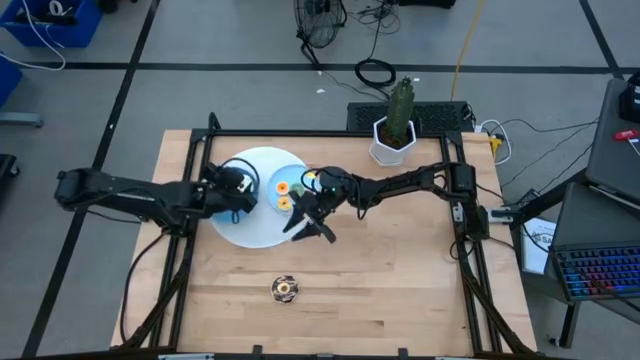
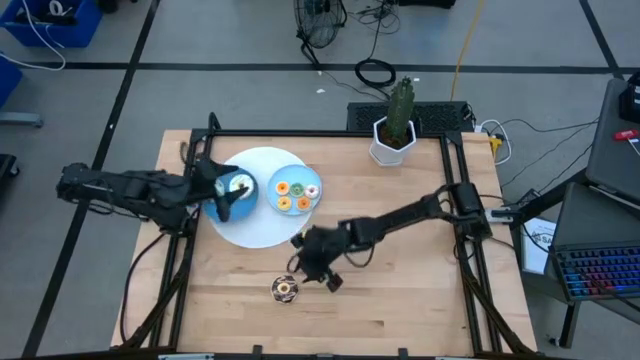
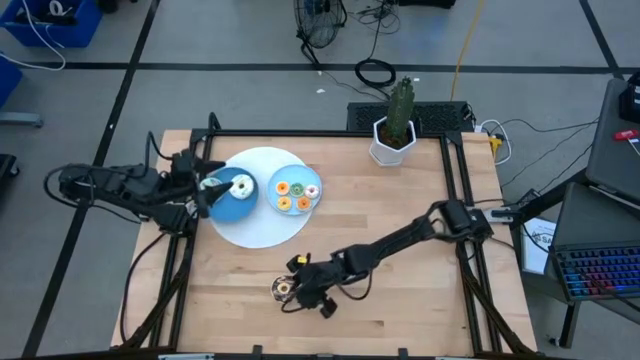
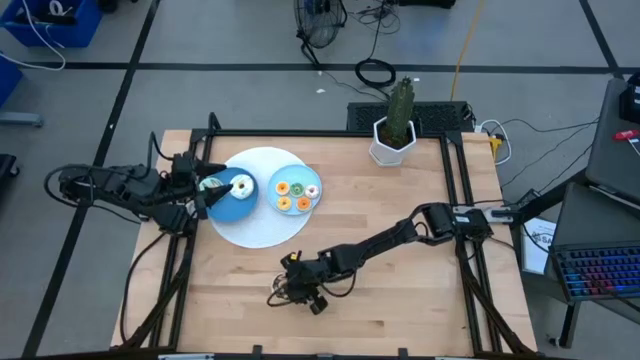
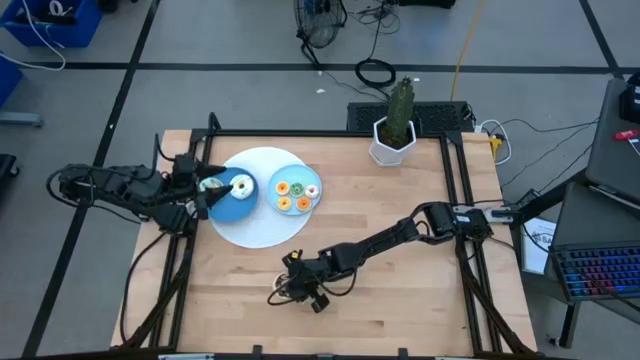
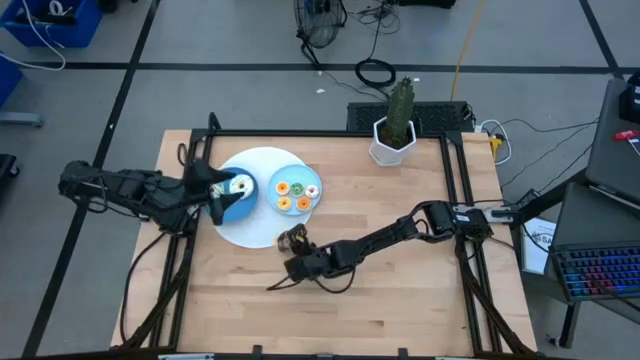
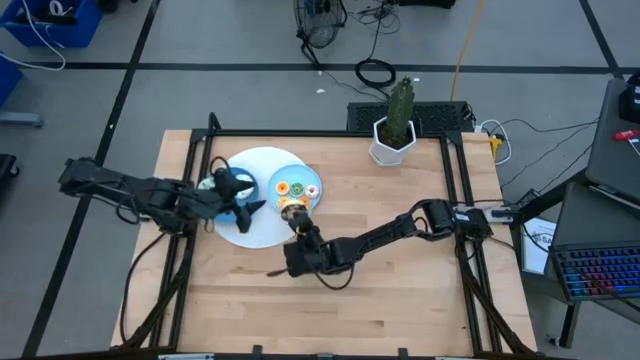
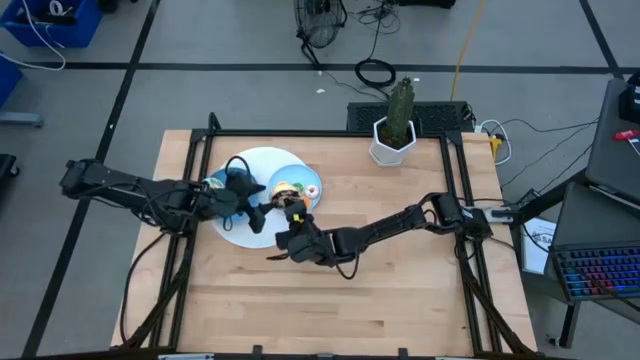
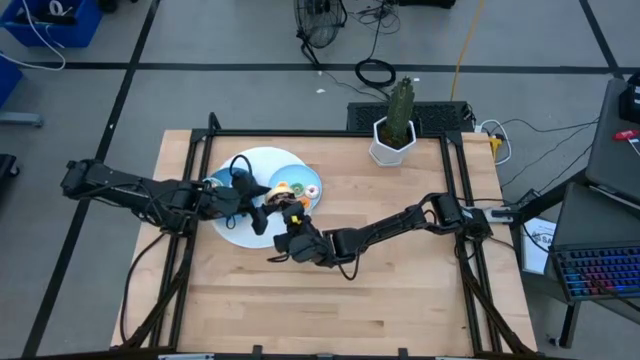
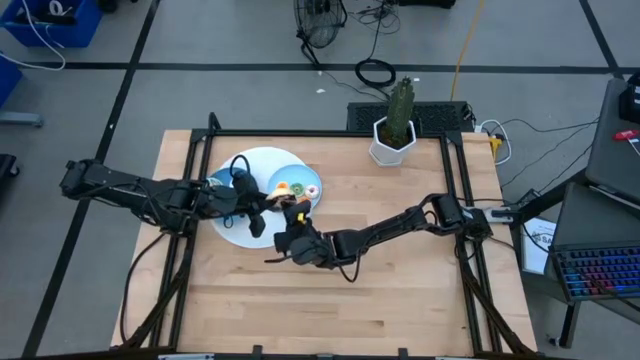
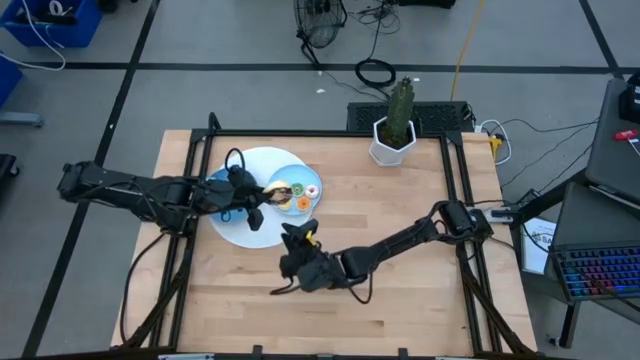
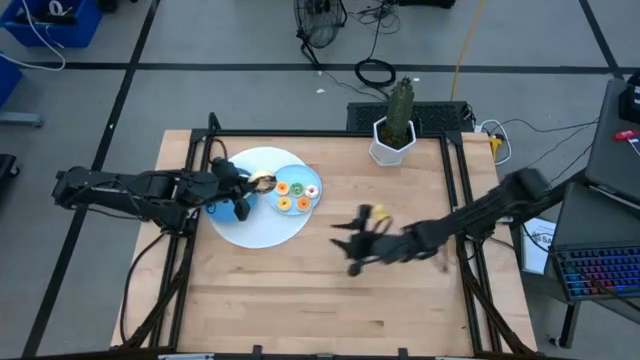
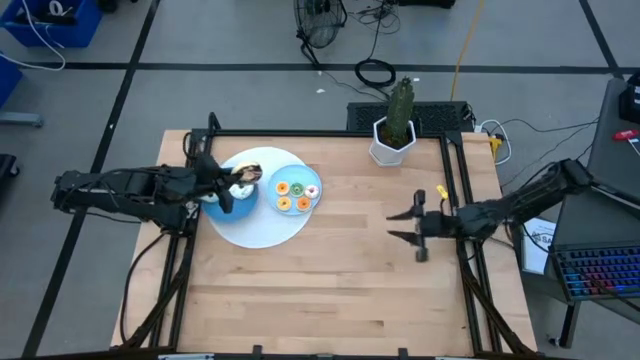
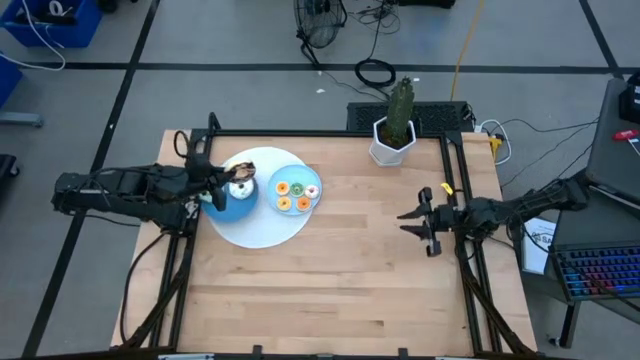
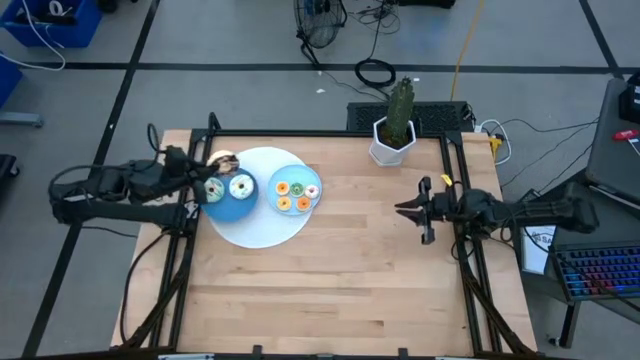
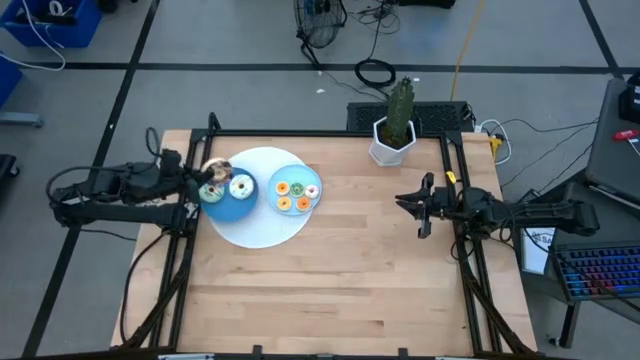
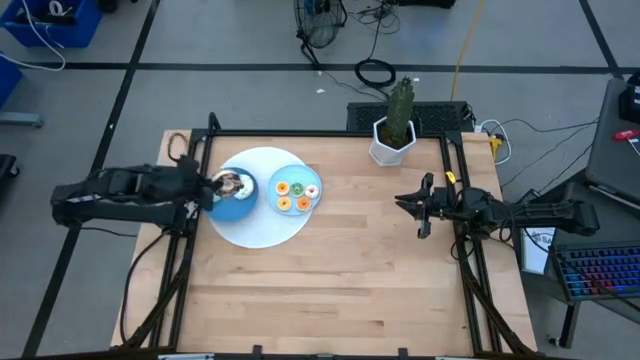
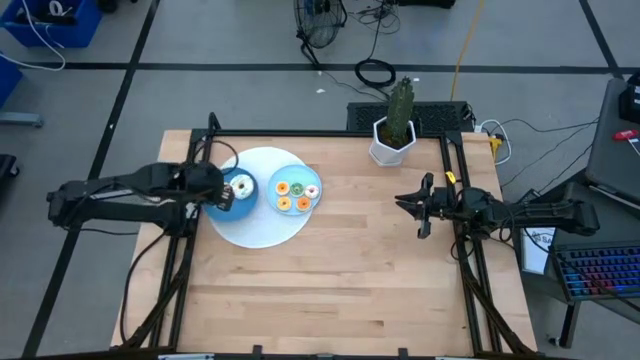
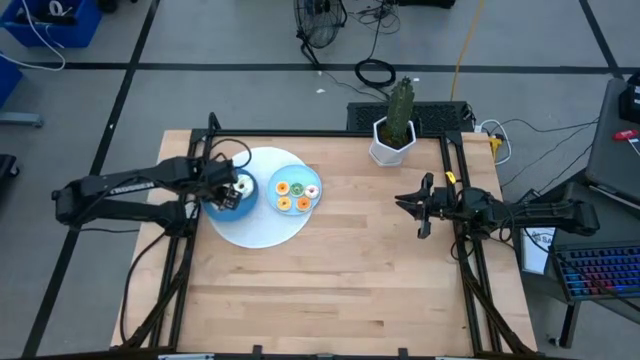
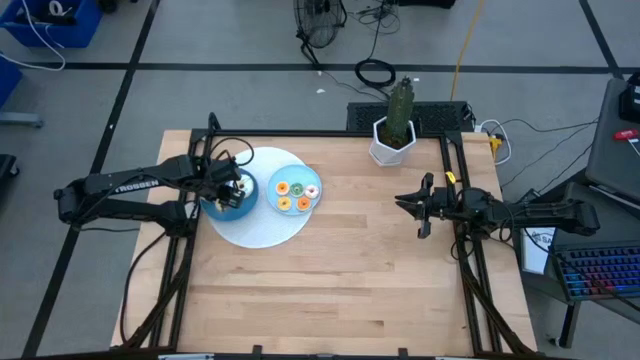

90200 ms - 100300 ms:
Task: Pick & Place donuts
Put the large brown donut on the blue plate

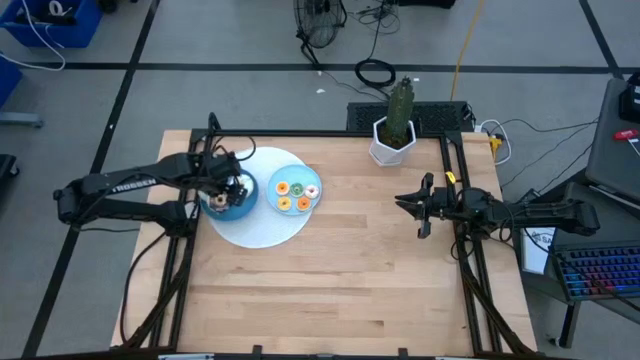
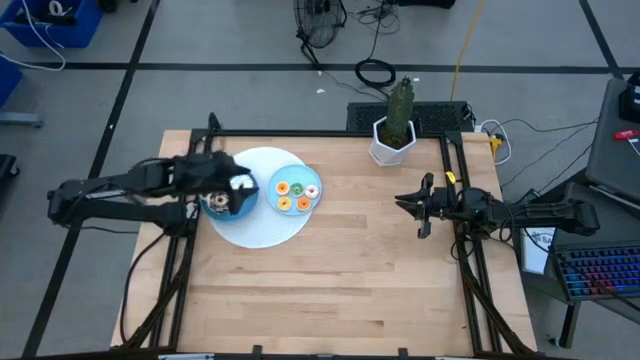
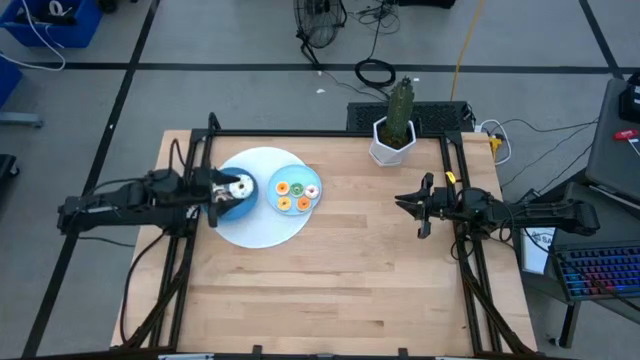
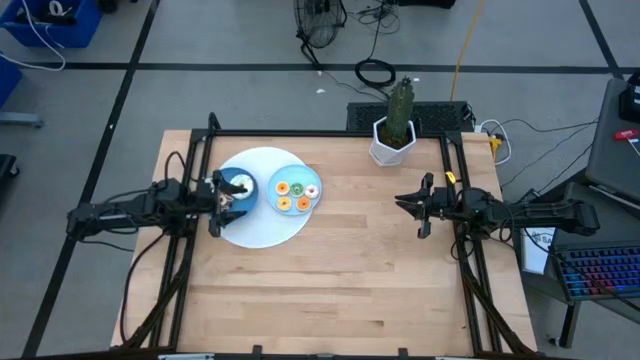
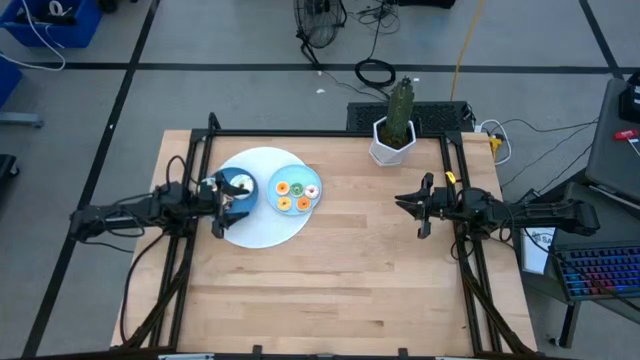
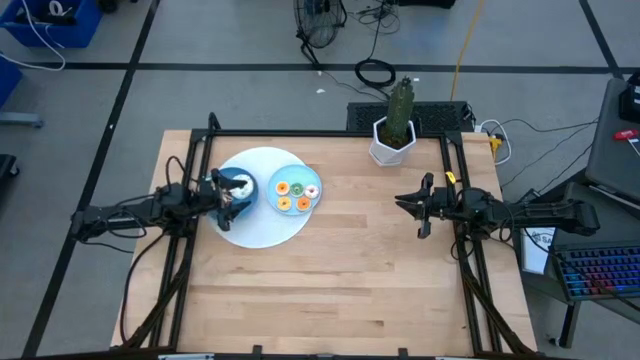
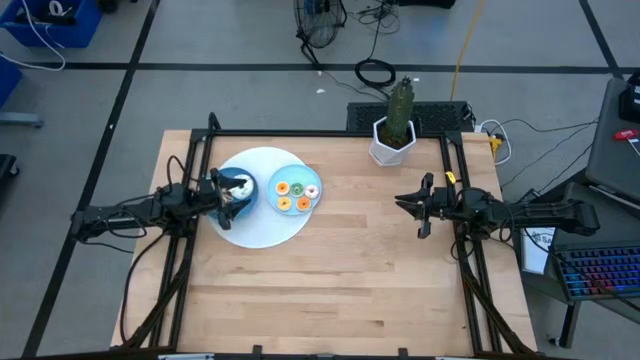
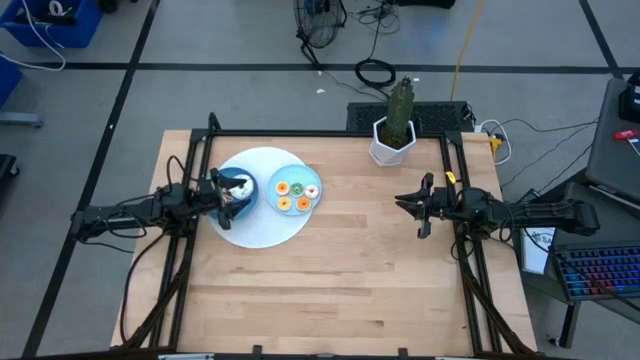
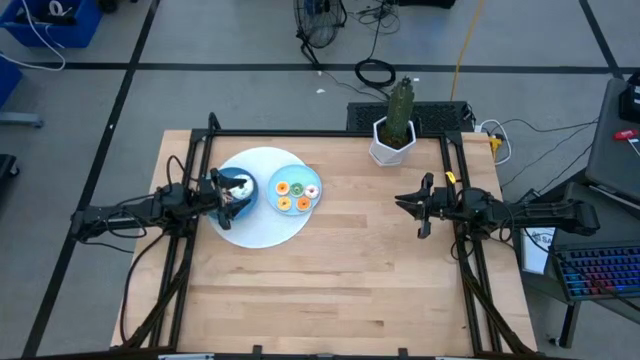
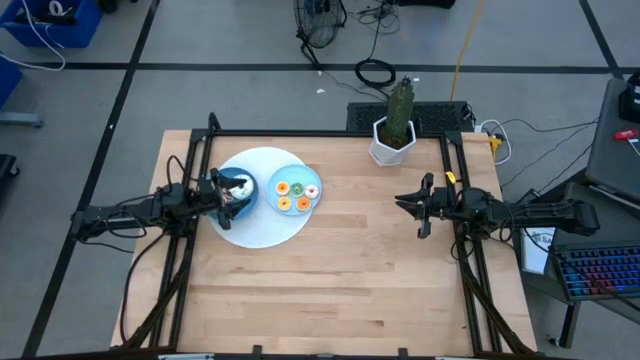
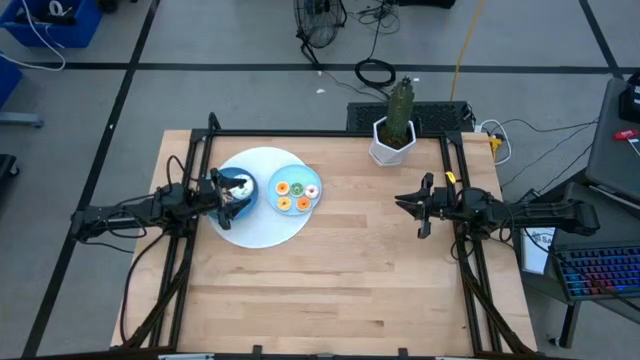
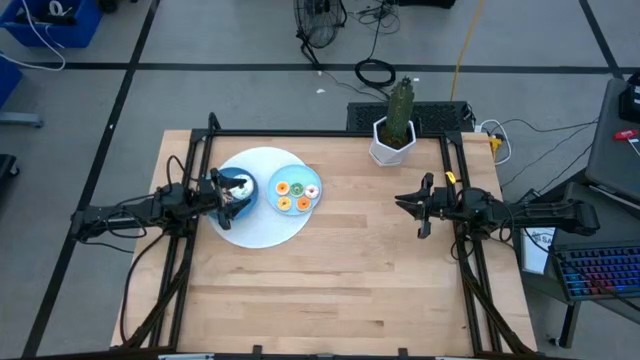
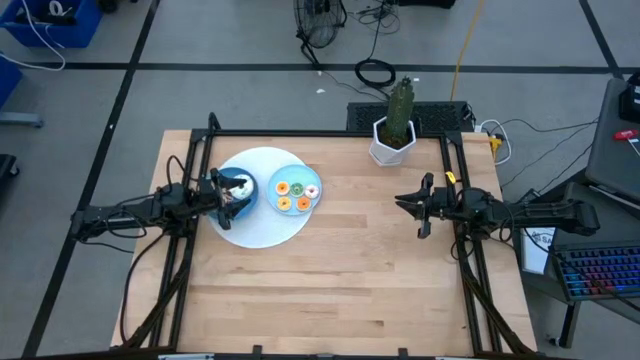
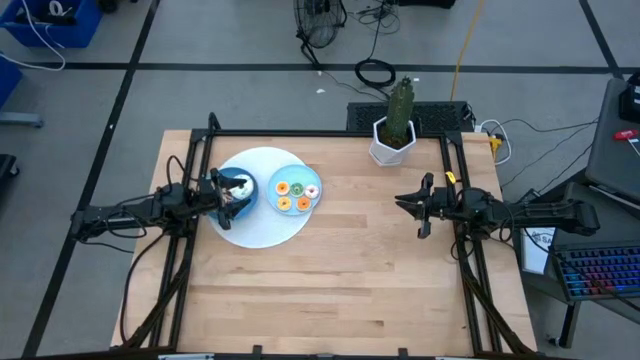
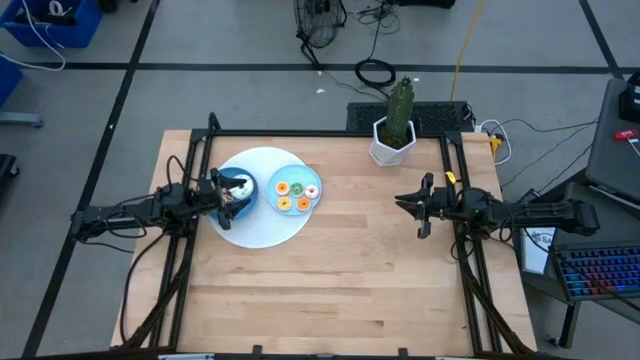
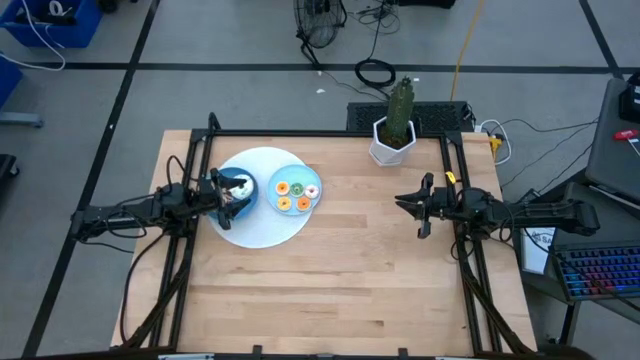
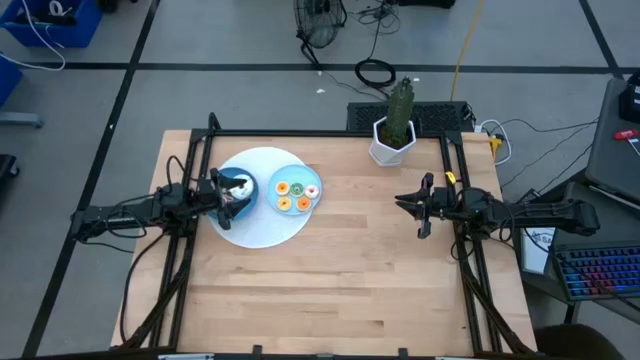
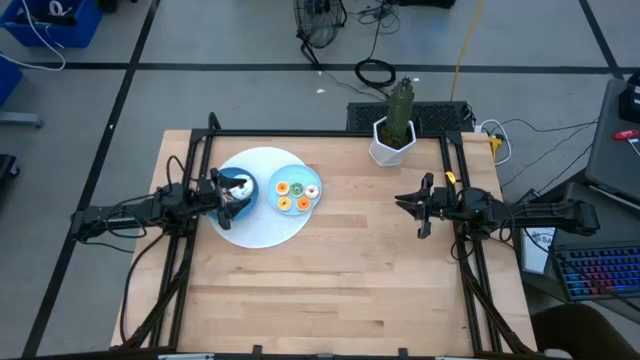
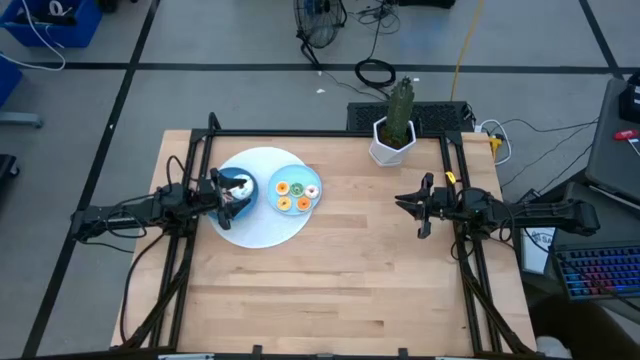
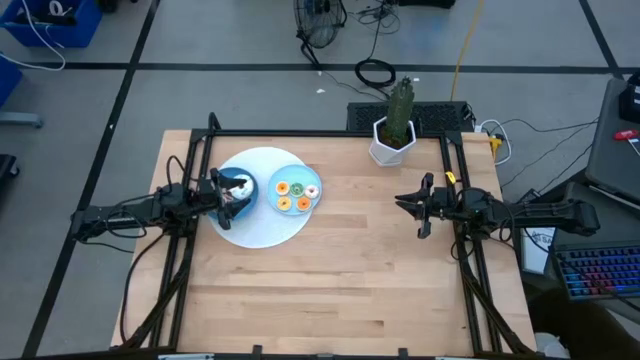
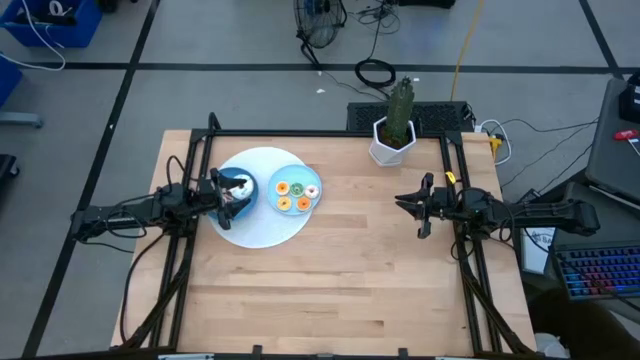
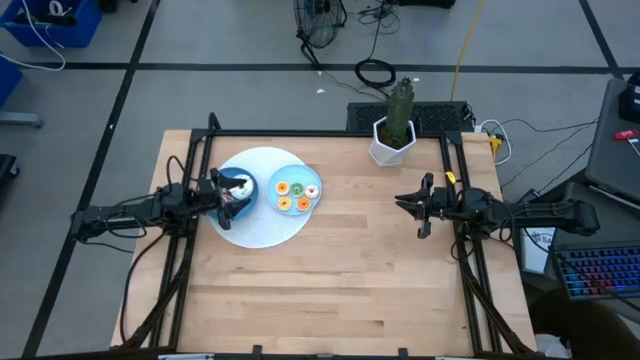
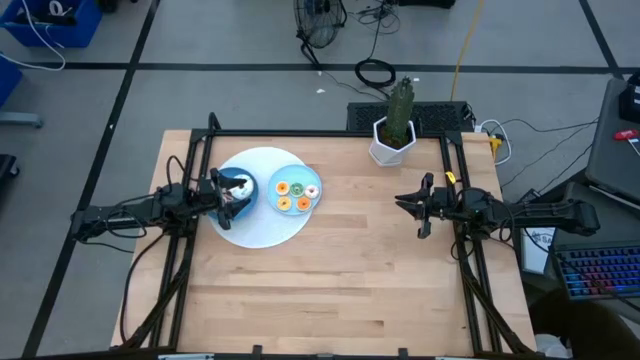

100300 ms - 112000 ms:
Return to Home Position
